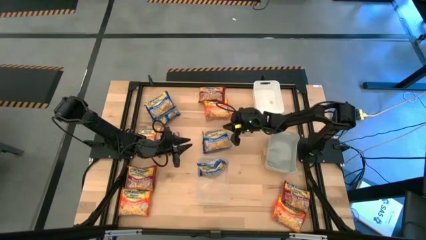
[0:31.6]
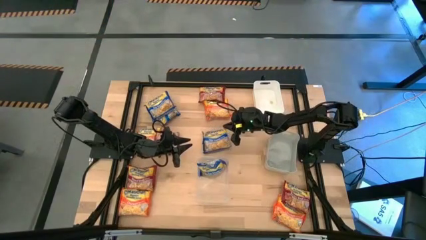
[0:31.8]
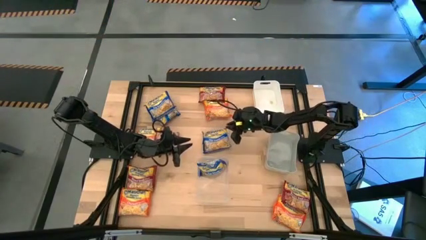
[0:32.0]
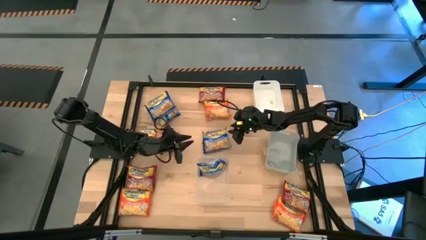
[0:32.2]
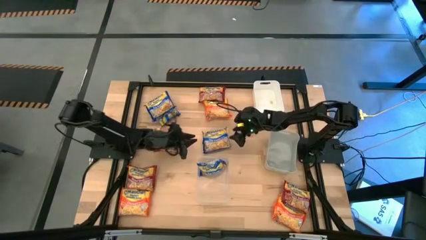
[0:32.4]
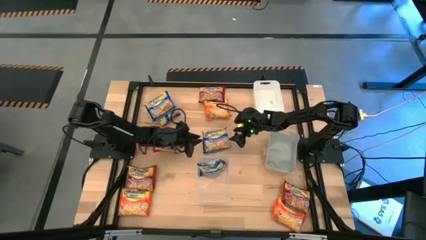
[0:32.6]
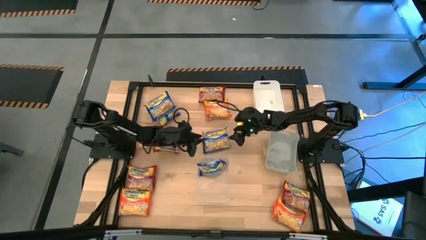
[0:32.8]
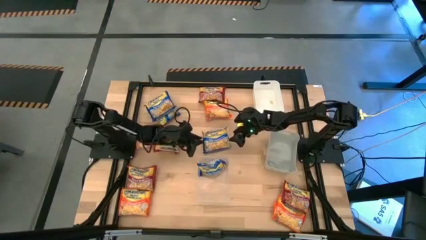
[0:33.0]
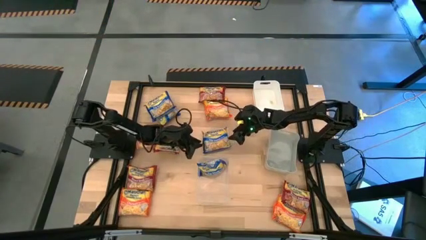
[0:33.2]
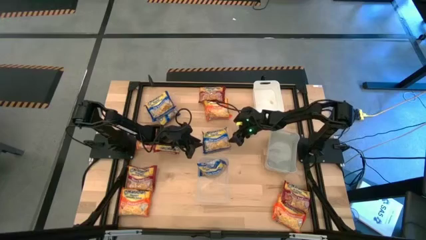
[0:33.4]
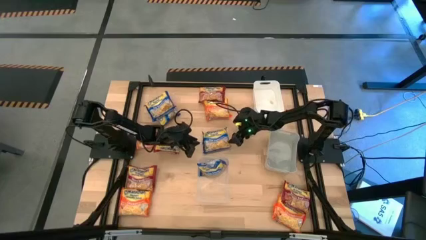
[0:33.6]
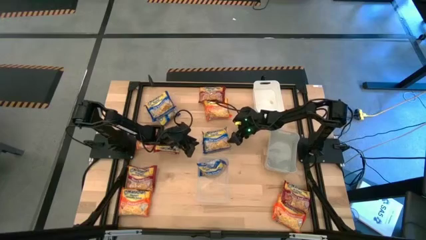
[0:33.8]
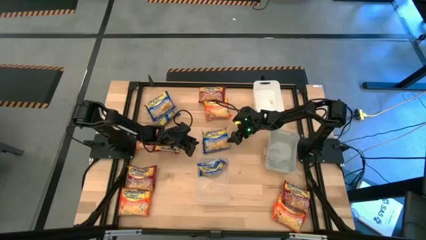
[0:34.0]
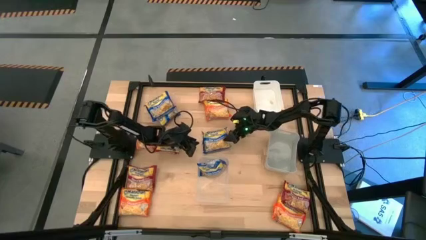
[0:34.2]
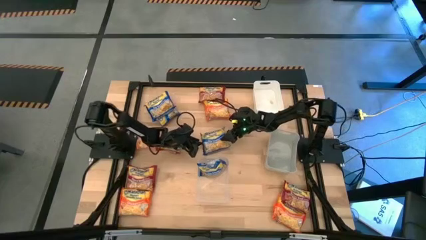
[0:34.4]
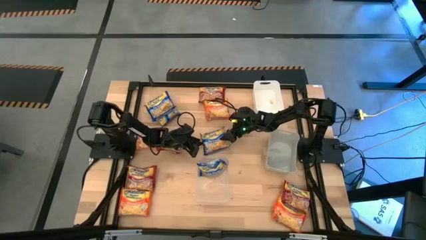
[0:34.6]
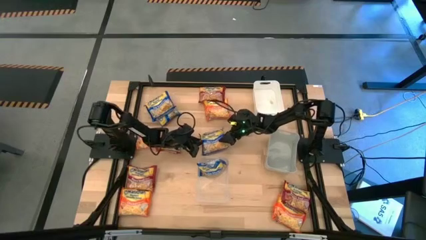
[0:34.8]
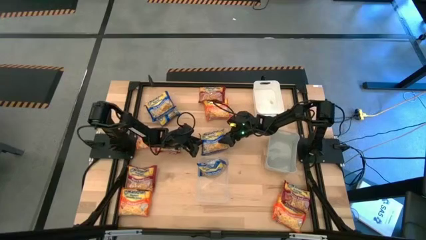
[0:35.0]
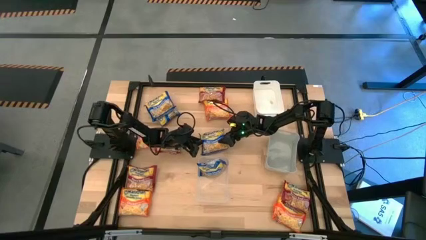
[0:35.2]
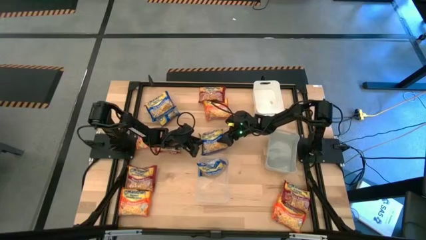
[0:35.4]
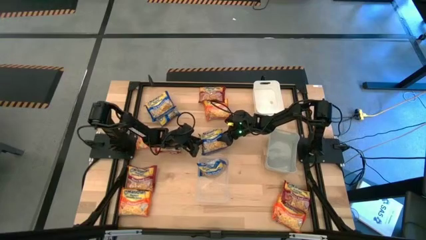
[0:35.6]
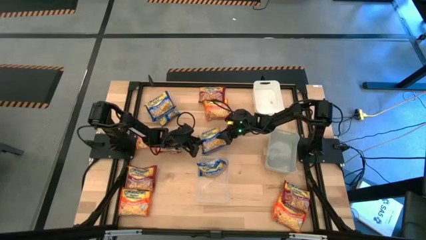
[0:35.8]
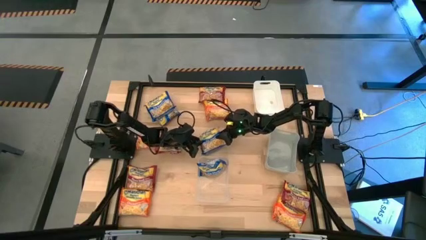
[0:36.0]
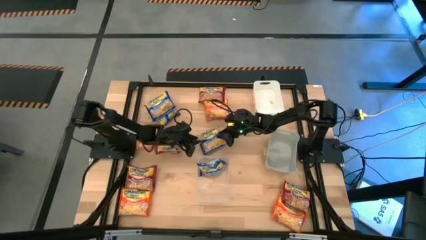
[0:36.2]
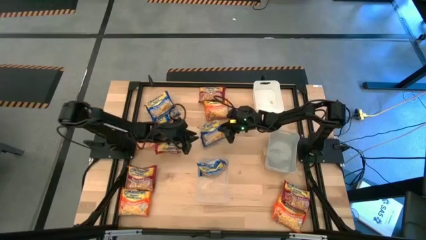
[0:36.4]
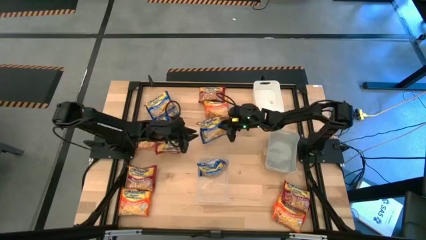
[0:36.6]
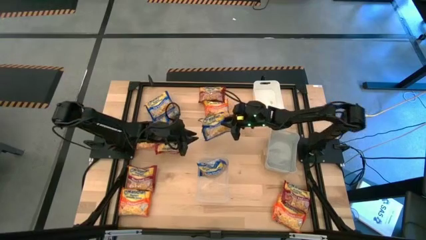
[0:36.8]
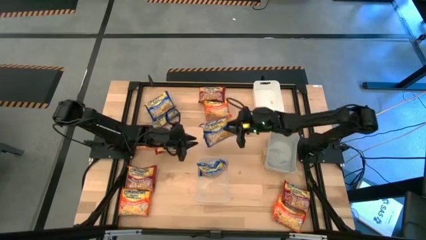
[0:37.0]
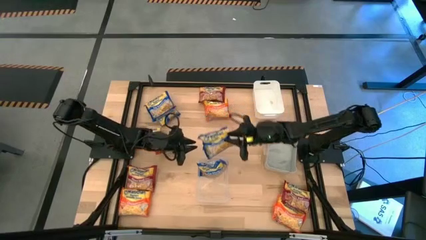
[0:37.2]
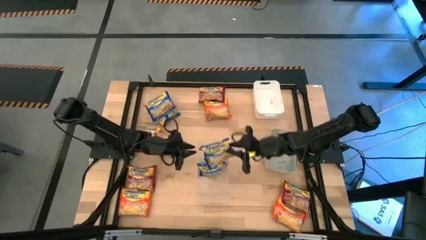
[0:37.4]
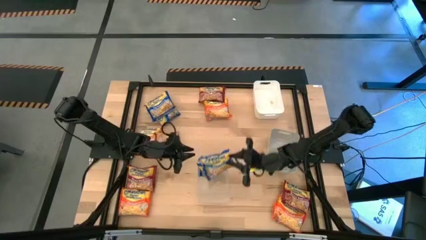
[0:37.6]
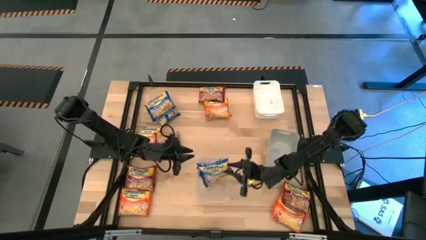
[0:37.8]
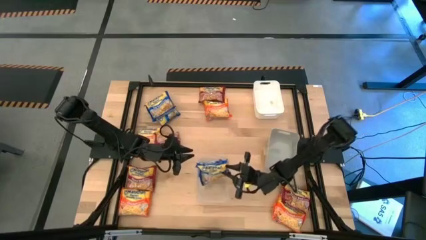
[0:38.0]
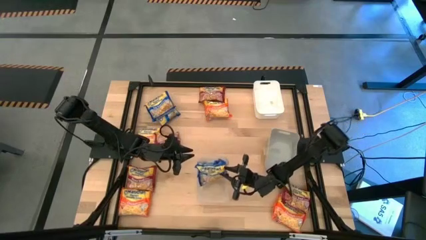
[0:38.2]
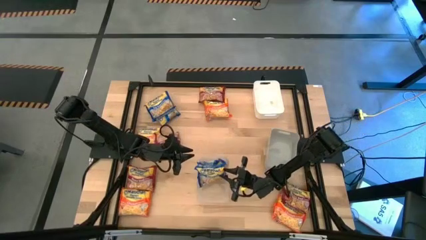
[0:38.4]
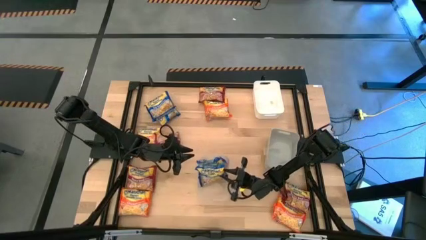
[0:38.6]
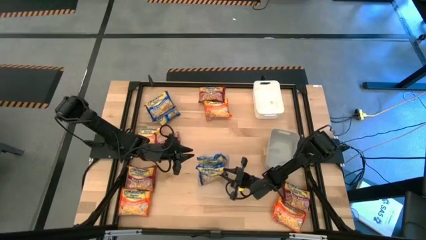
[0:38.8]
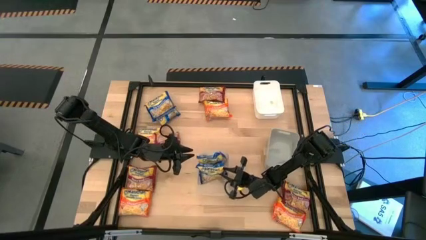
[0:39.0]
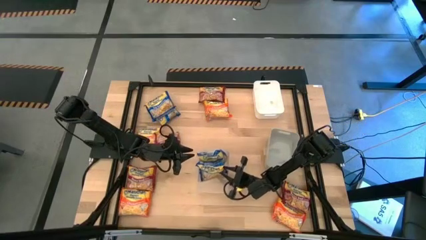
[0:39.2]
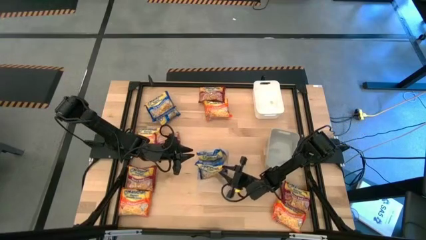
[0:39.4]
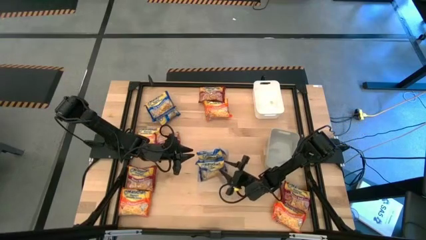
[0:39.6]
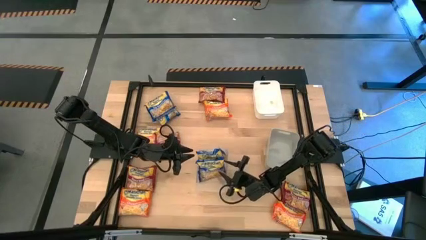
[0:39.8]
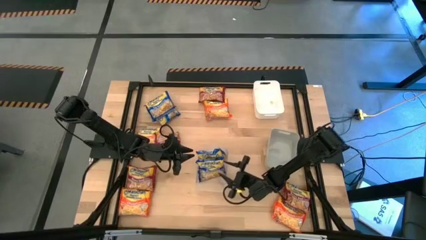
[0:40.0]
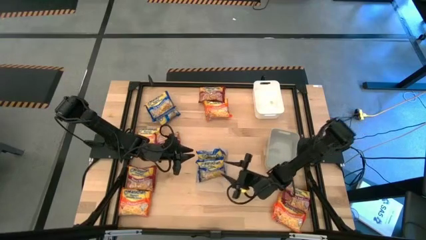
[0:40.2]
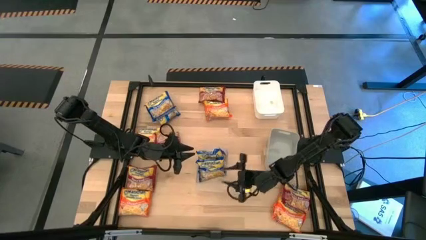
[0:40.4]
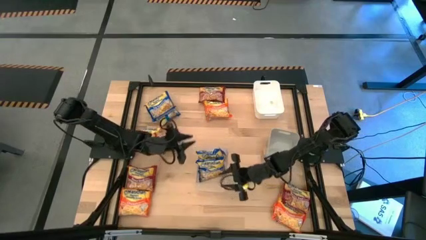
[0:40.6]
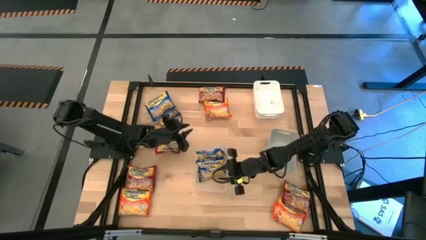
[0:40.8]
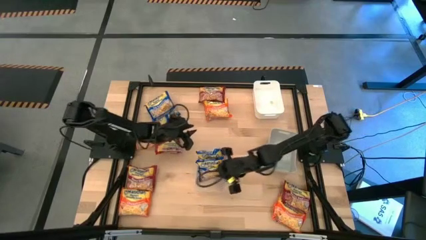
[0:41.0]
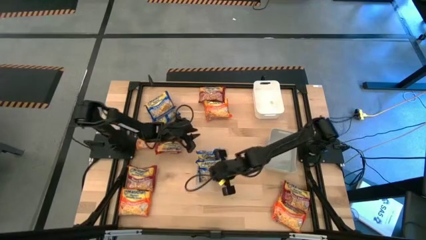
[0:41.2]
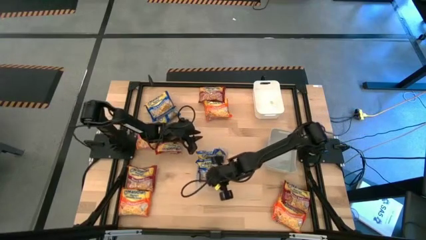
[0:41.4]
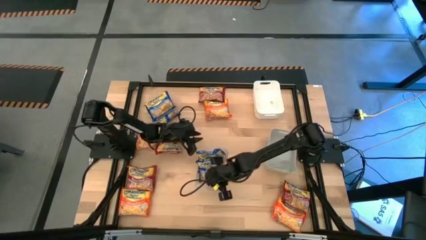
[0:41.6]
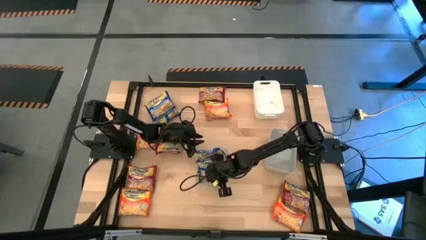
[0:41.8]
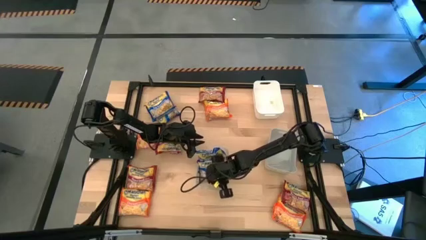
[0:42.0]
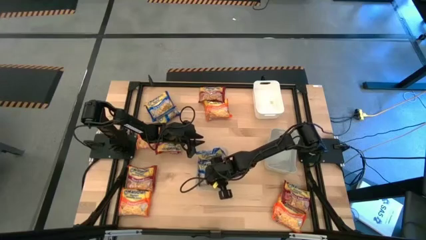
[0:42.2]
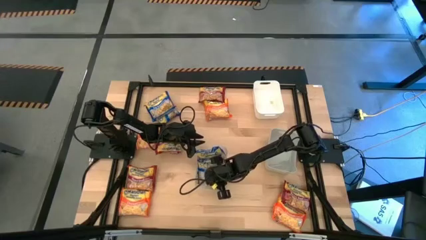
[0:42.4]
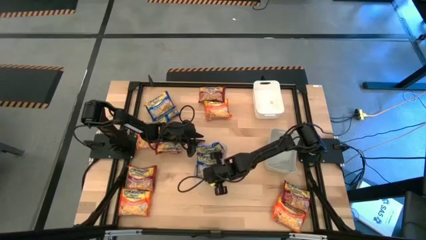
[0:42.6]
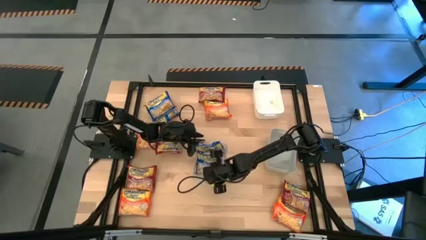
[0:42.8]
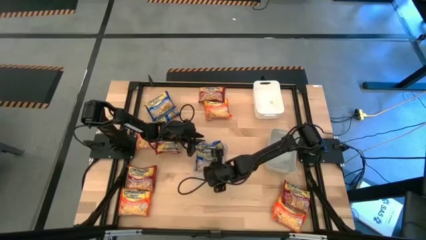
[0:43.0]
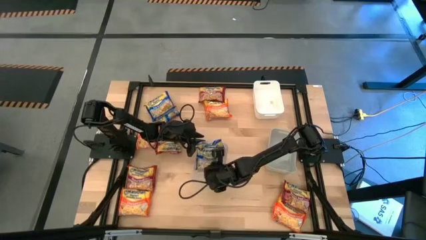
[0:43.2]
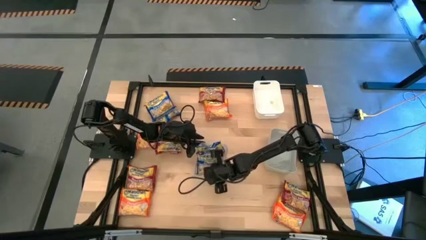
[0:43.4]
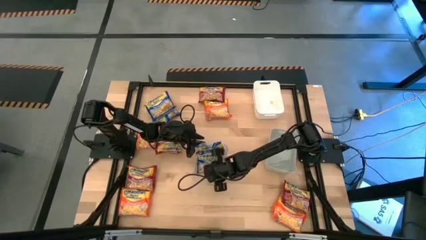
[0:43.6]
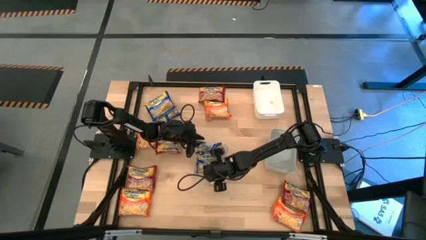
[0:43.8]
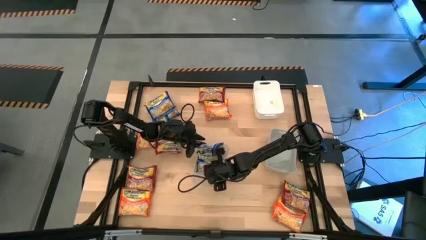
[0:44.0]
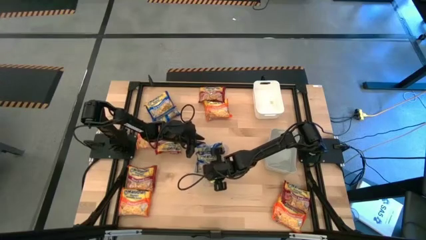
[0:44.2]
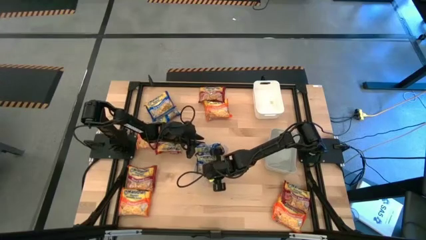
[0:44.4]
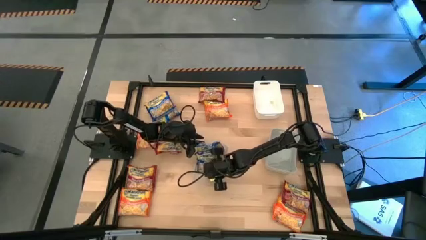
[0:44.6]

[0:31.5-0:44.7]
Task: Sort Maruchan noodles
Put the bottom blue noodle pack into the transparent bin
